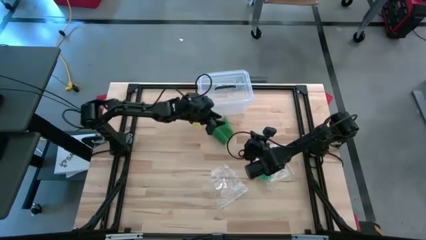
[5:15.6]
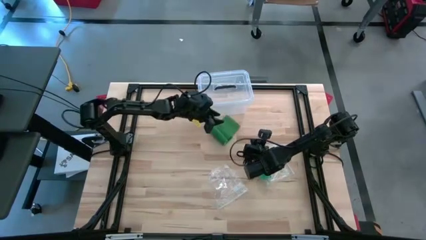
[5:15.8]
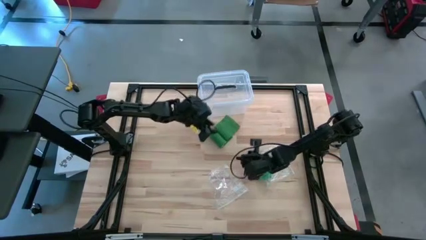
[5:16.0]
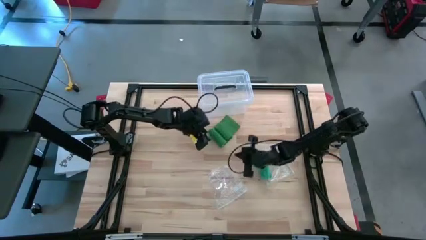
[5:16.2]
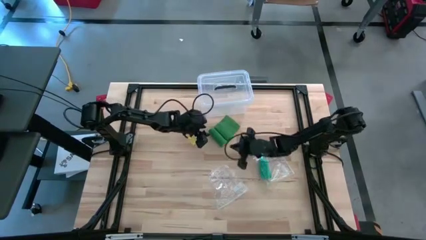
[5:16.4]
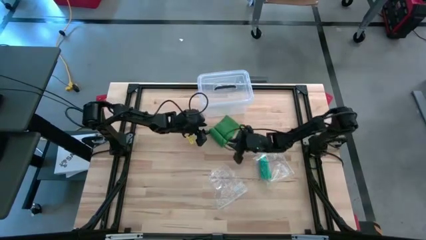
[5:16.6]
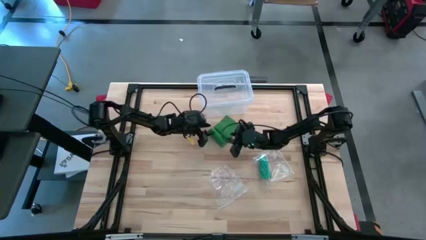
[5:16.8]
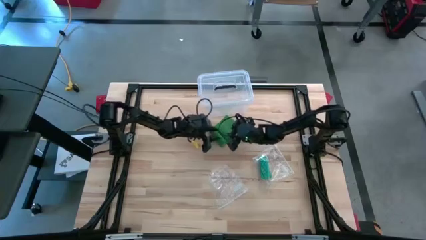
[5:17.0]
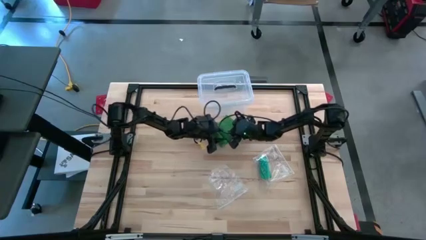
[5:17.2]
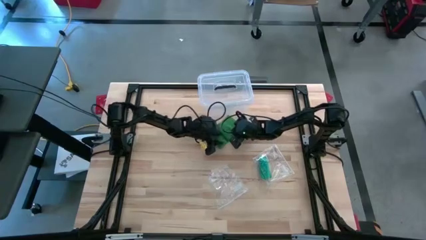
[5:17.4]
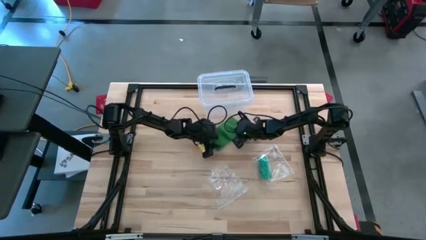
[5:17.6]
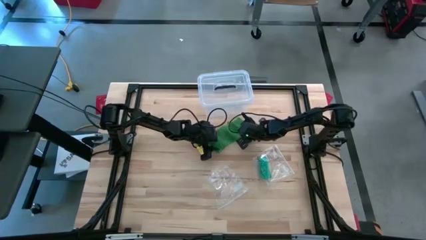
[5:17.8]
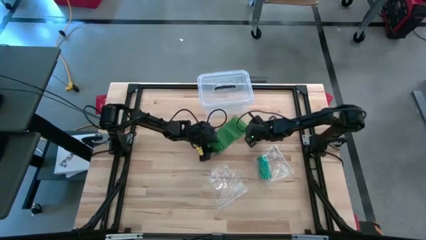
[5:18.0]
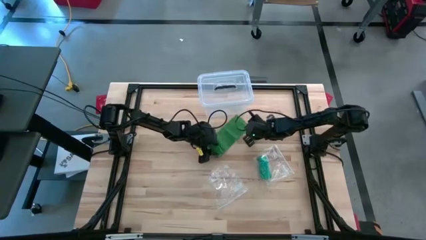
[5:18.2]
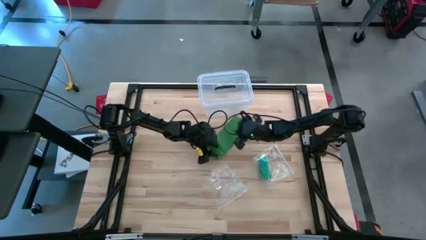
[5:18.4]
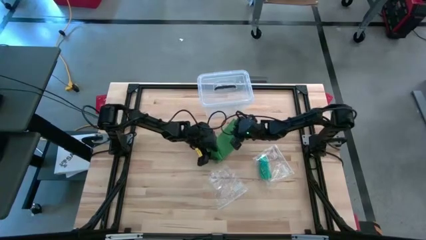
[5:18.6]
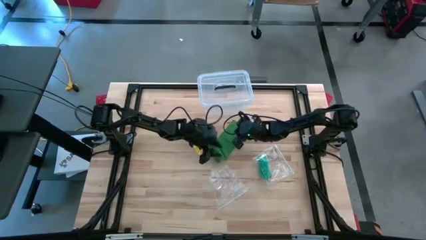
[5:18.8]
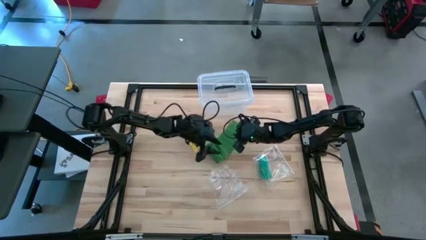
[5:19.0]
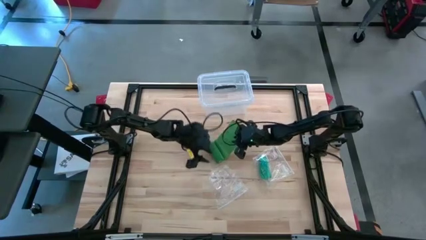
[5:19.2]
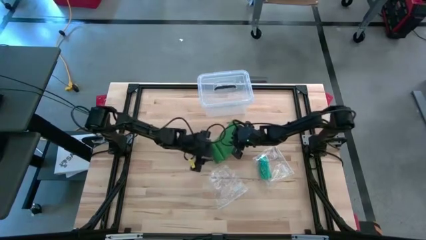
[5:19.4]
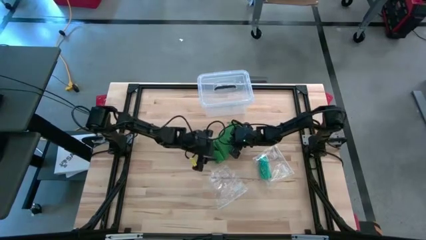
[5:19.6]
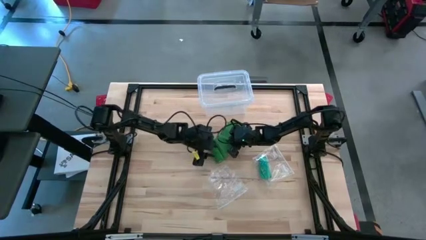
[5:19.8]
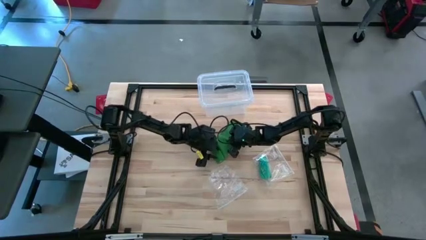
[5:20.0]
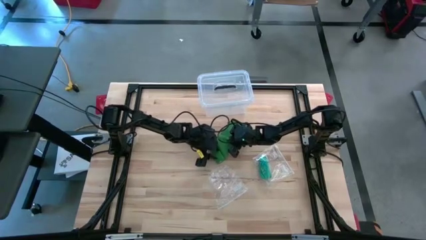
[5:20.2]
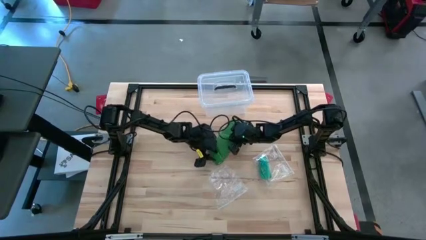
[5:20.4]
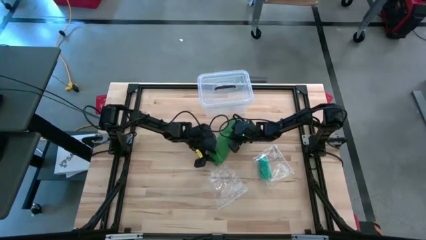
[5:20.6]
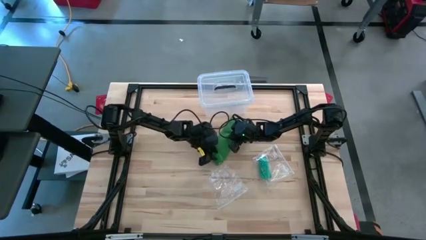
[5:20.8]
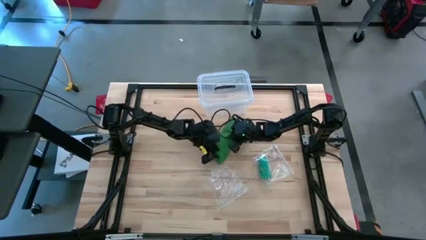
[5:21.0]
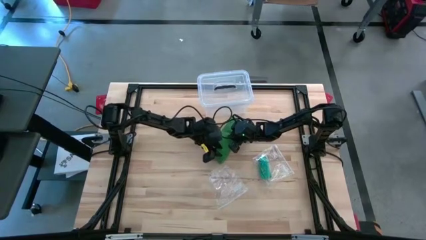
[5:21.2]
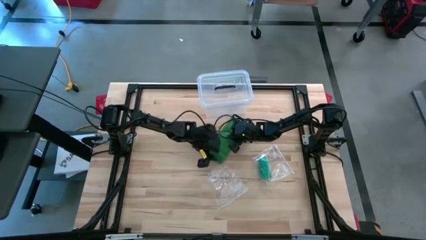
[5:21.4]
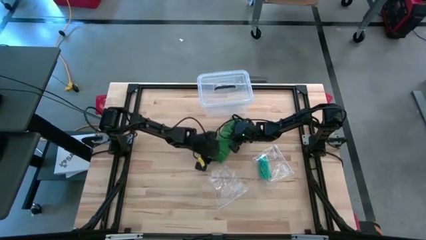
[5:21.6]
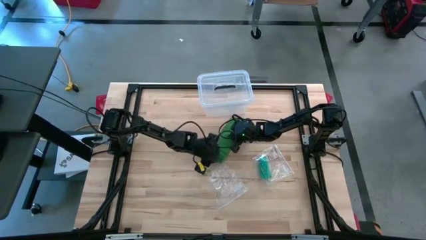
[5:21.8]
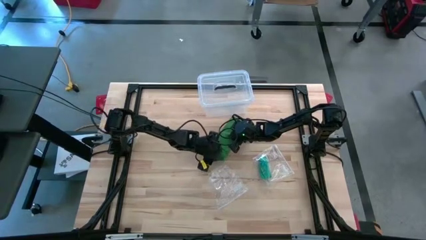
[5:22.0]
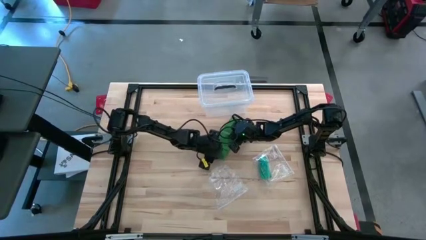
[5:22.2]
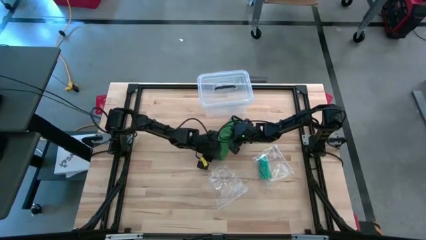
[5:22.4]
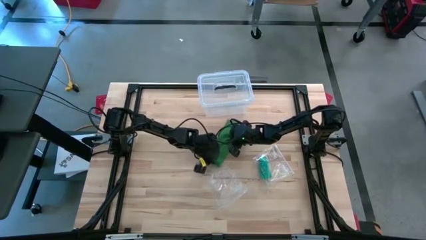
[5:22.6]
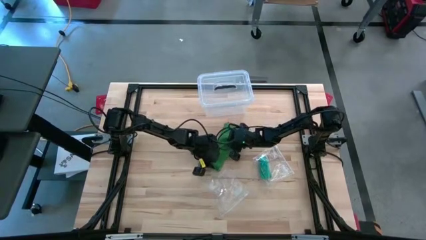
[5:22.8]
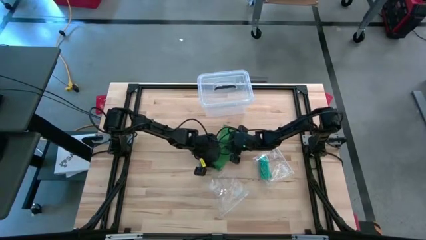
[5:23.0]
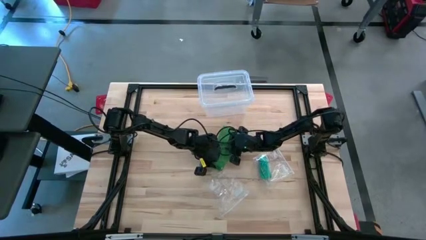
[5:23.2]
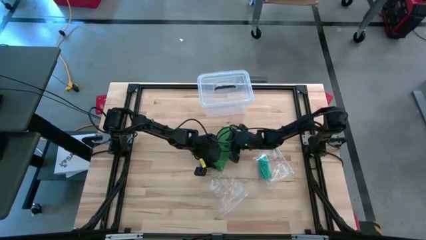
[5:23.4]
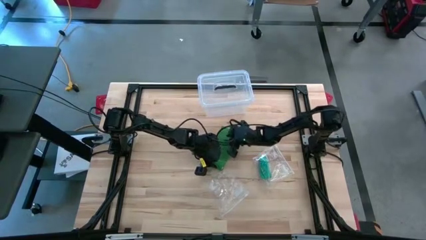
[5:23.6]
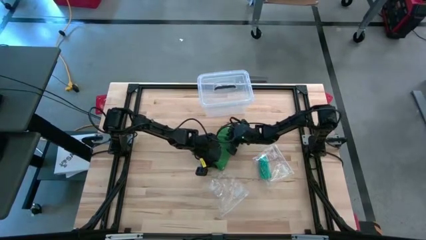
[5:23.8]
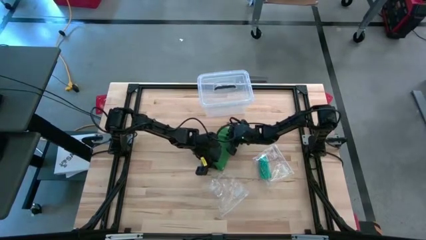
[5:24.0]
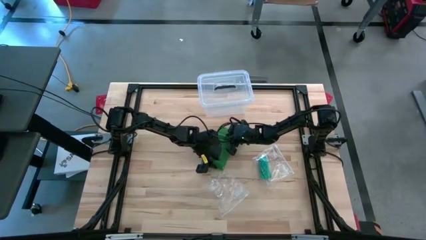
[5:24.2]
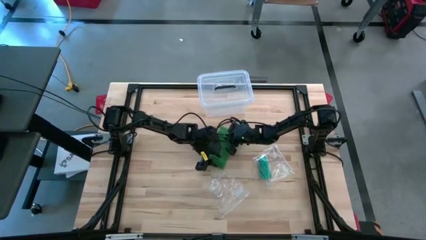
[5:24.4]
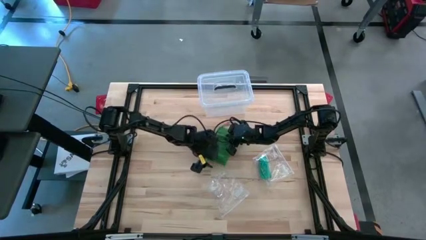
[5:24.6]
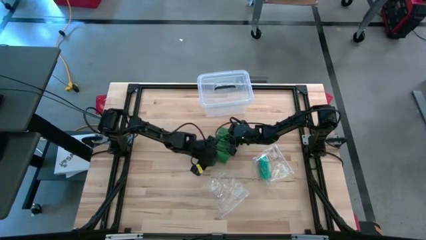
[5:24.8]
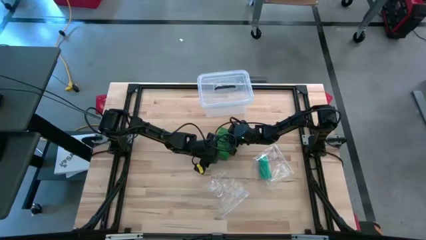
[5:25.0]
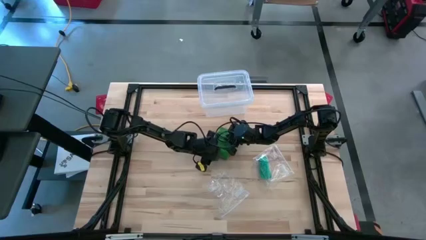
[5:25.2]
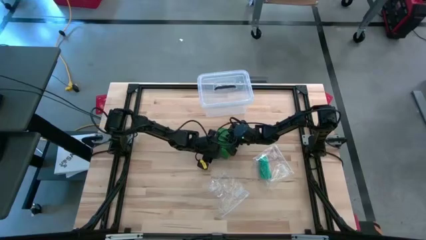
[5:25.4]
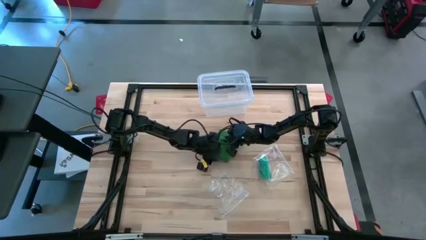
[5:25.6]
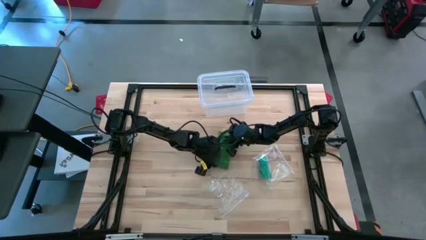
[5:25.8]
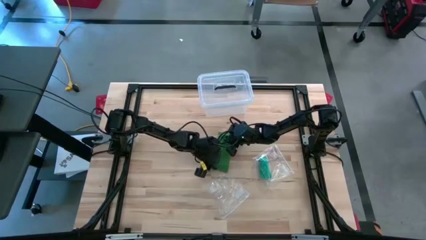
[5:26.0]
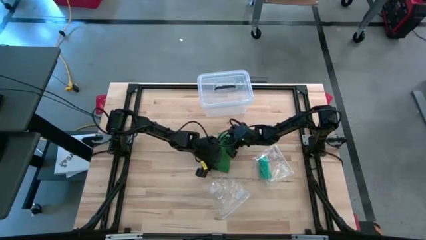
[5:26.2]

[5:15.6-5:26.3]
Task: Roll bandage
Roll the green bandage

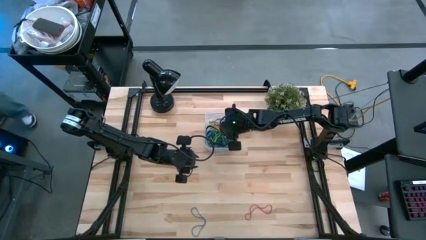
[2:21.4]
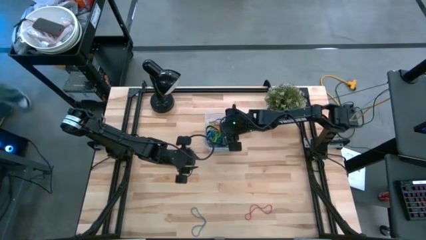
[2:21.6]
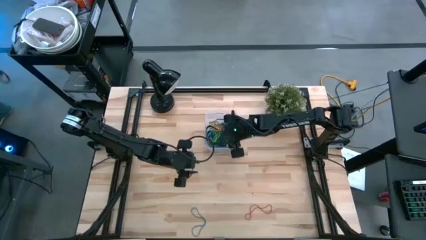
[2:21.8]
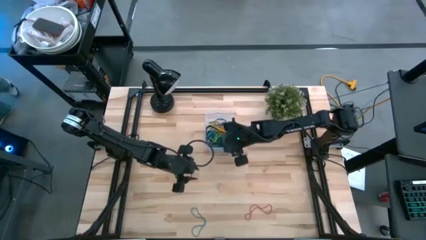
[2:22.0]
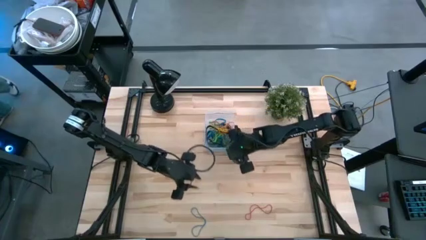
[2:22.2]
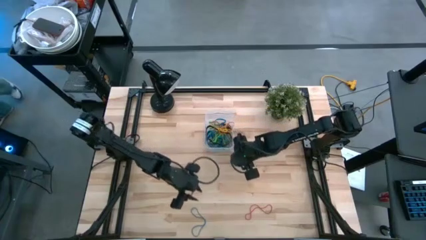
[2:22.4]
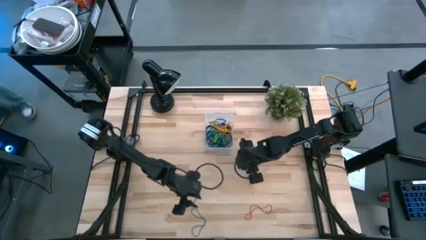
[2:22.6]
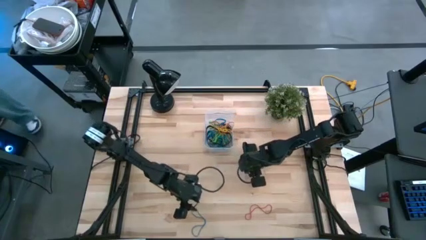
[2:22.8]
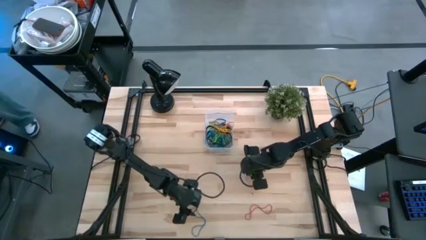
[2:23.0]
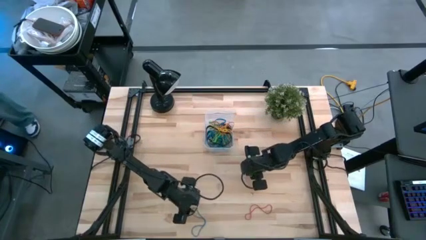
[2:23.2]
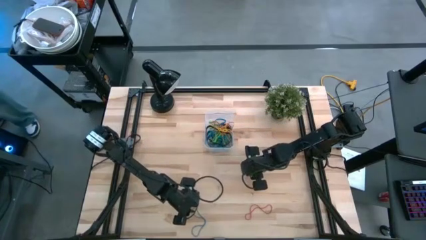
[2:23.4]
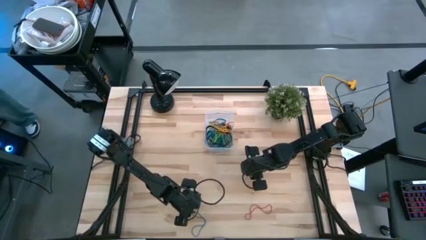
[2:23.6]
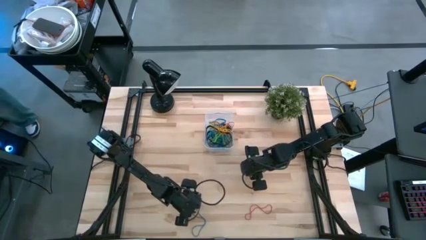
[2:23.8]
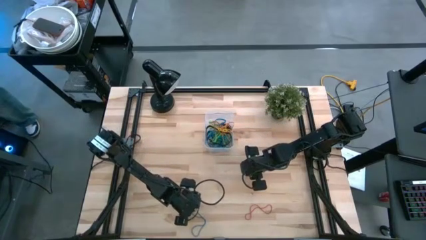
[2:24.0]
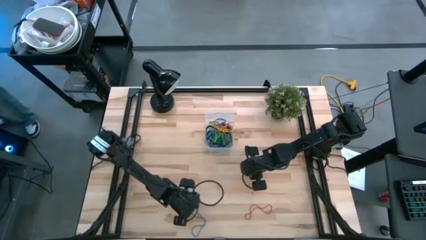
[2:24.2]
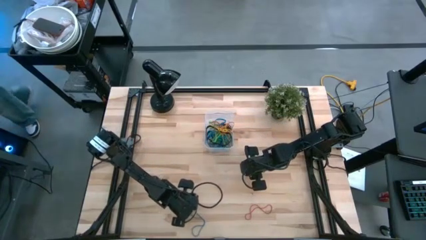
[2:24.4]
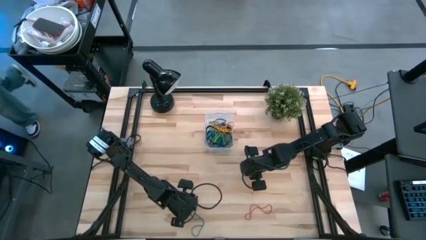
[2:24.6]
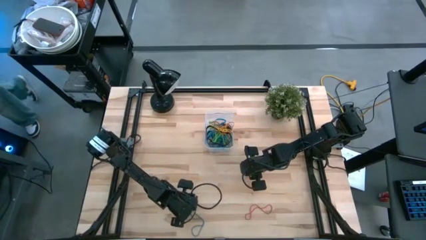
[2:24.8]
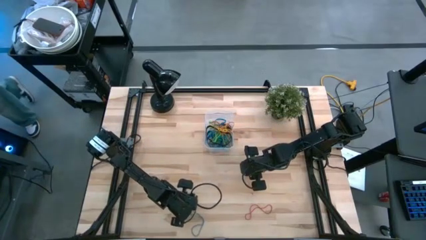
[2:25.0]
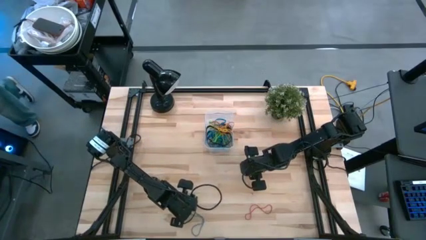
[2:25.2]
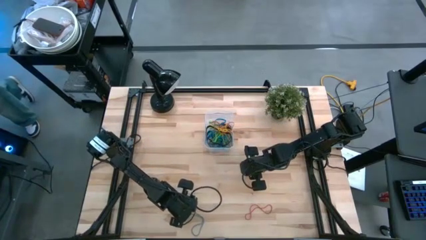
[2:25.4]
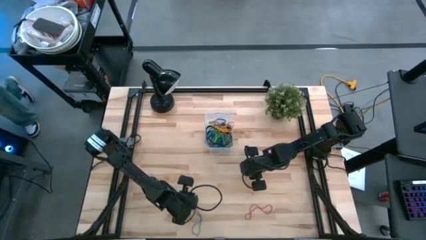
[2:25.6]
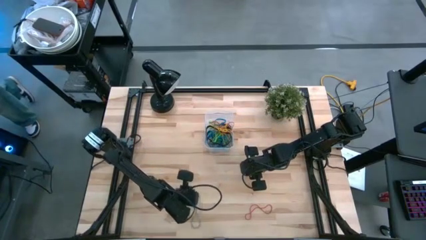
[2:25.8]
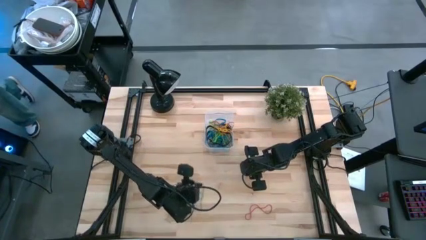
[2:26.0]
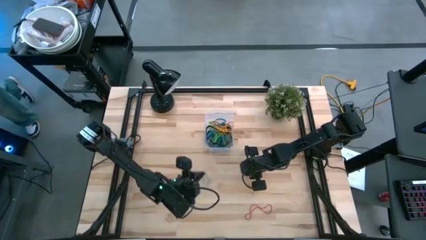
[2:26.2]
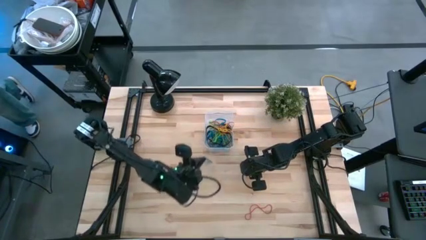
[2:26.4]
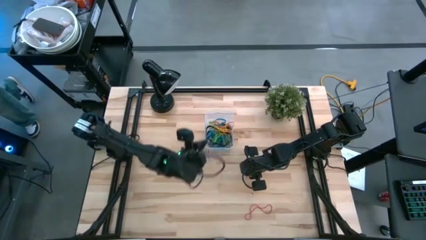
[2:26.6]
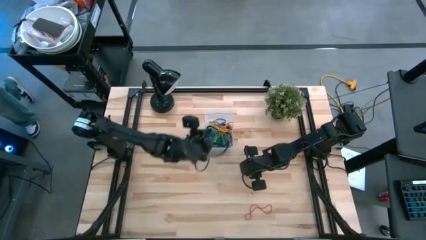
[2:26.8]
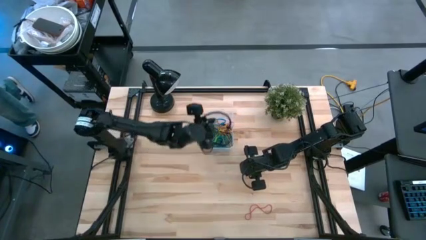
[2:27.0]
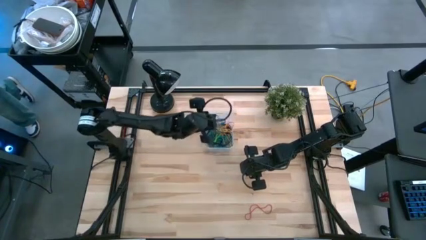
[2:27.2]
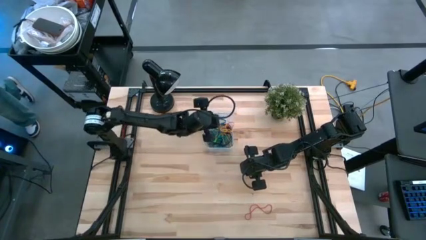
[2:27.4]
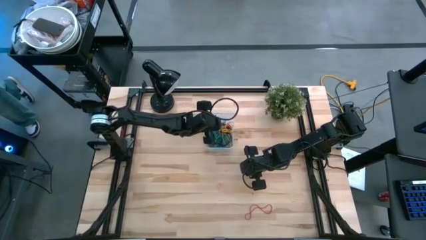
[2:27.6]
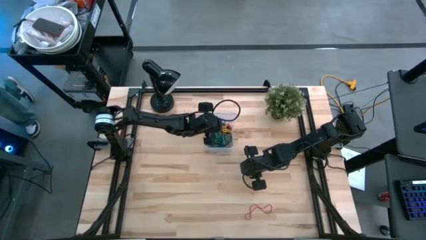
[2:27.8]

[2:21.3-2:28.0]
Task: Pick and place rubber bands into bin
Put blue rubberband into the transparent bin
